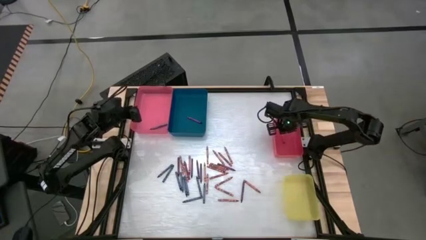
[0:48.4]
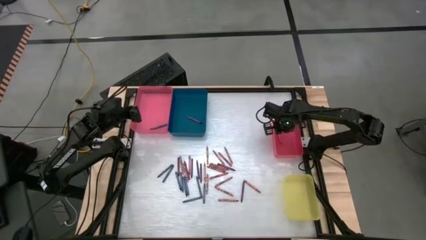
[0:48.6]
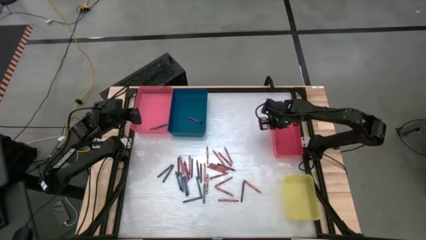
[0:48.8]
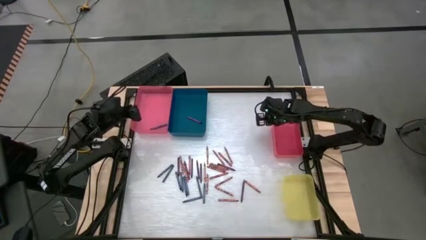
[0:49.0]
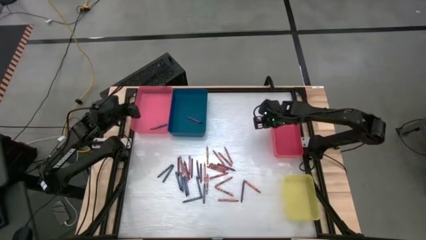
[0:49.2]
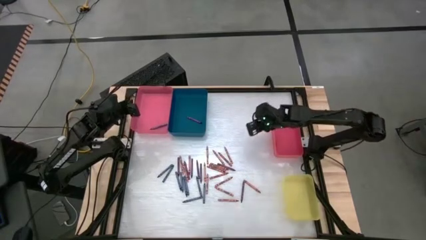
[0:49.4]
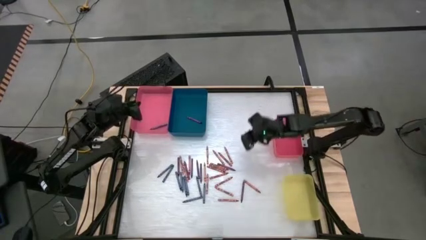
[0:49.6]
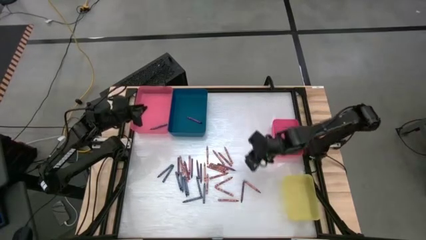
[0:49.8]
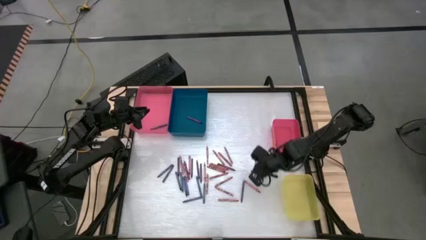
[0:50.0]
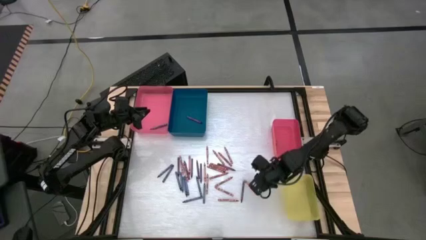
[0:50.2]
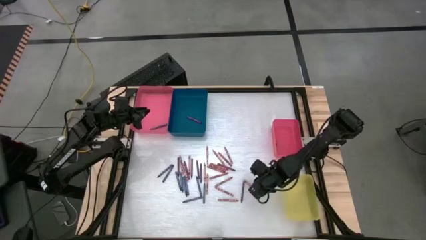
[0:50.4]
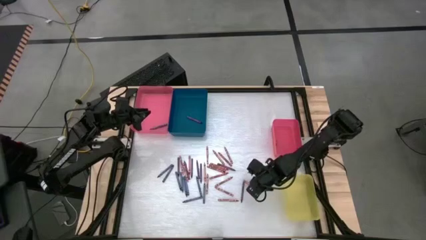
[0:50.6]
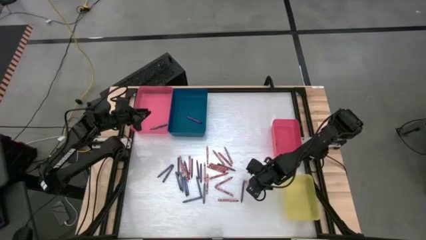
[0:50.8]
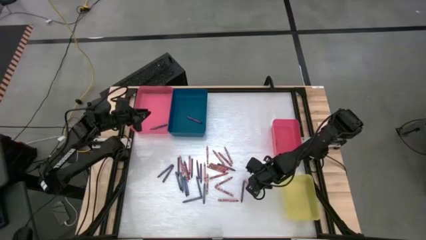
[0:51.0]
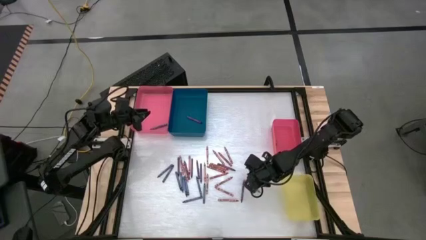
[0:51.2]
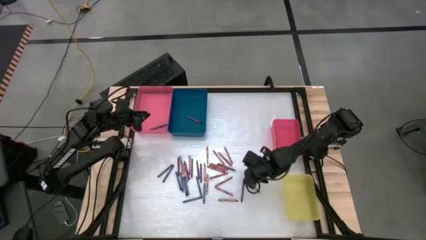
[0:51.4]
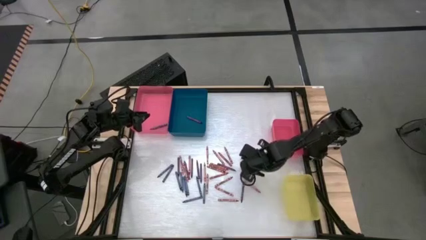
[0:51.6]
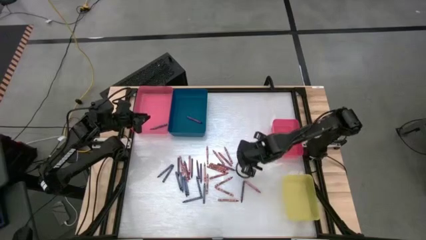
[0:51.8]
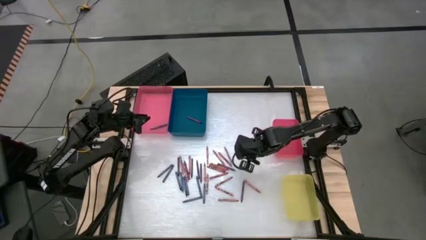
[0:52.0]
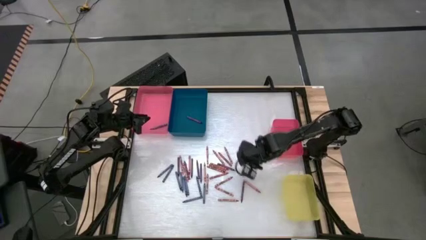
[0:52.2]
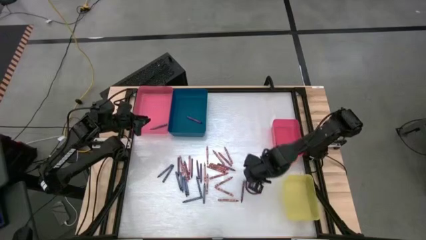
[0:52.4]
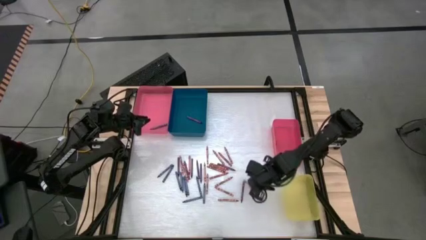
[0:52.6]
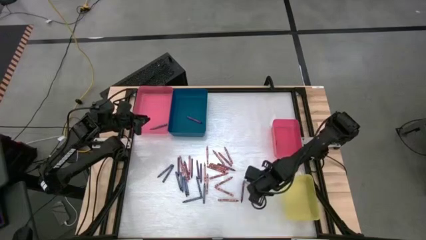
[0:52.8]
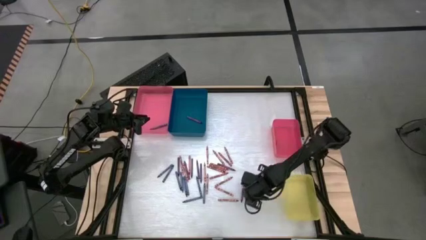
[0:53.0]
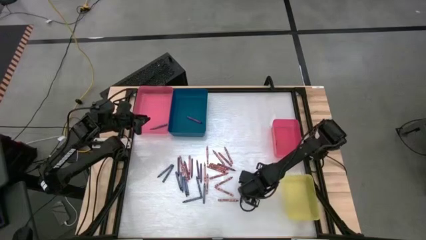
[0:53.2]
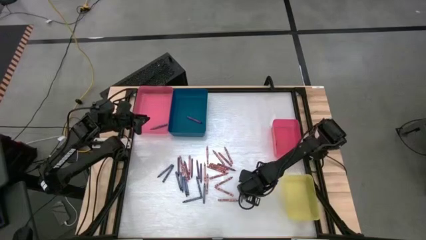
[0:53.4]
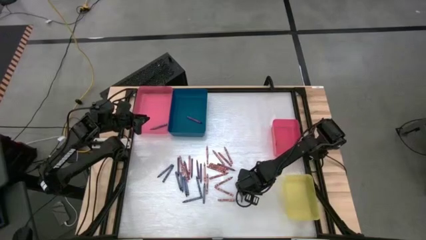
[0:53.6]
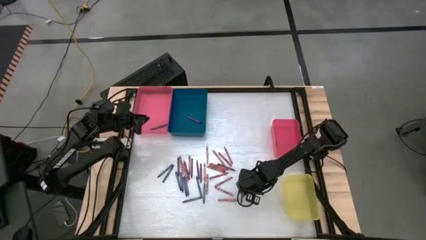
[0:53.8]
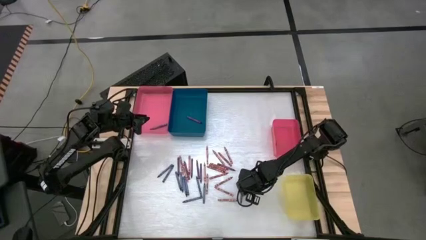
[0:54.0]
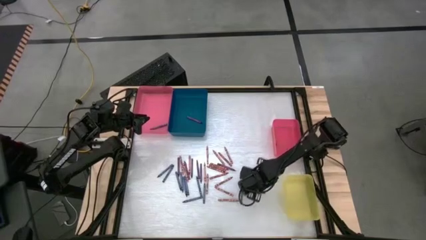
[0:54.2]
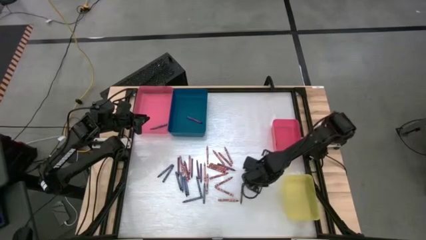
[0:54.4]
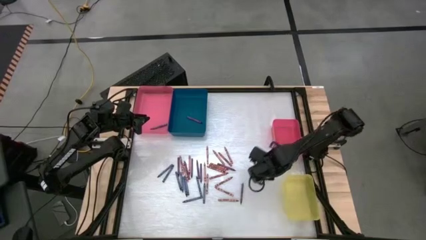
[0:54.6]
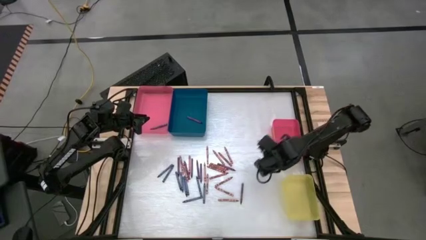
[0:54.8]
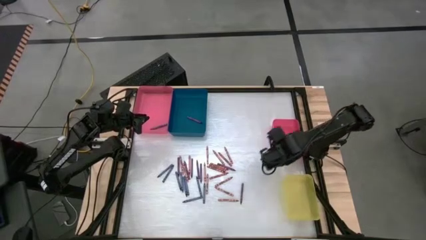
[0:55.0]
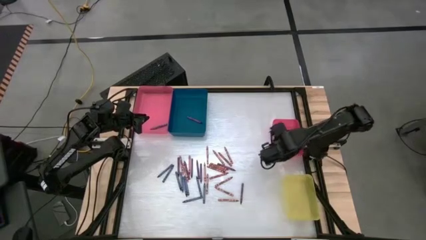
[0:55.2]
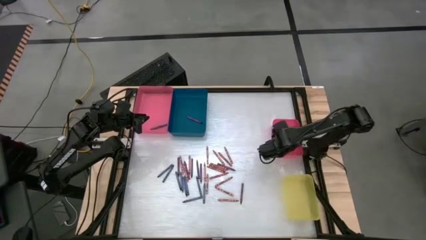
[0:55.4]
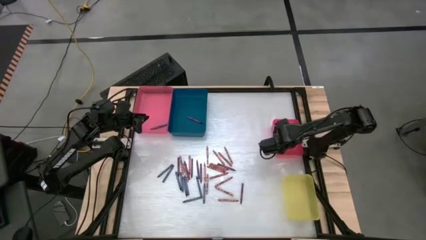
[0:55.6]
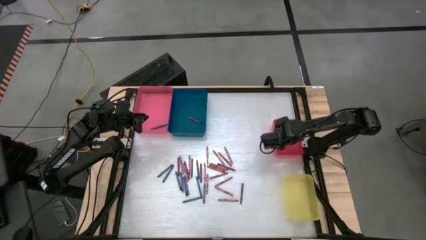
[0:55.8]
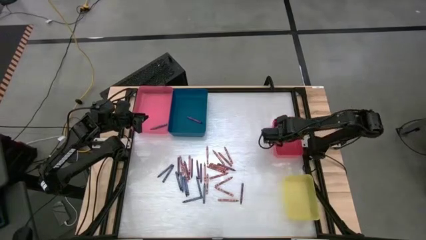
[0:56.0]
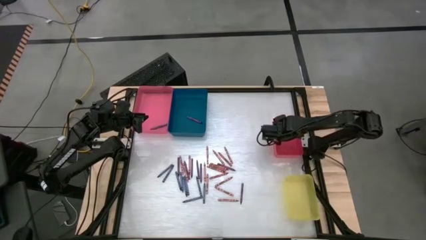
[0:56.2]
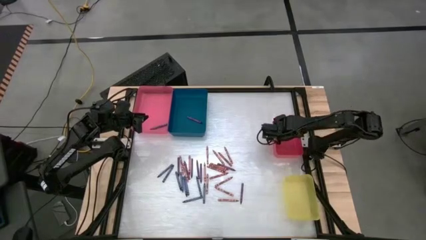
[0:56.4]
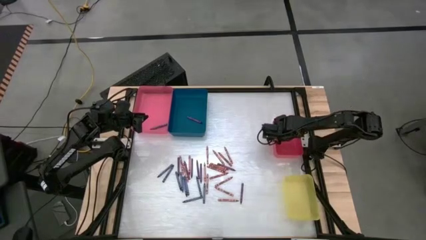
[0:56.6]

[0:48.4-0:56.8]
Task: Sort crayons
Put the red crayon into the small red bin

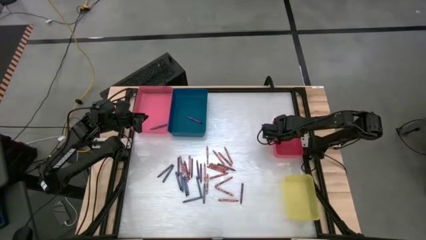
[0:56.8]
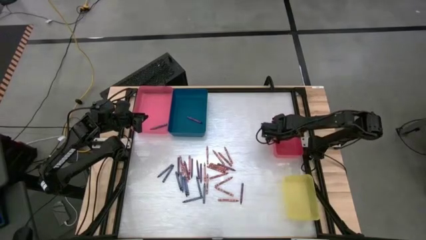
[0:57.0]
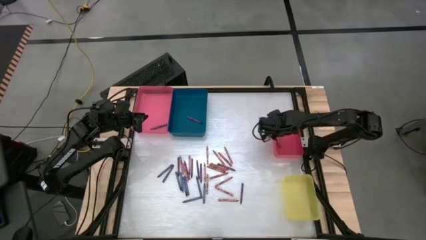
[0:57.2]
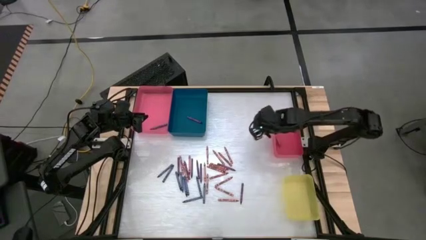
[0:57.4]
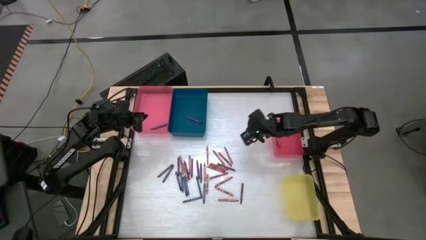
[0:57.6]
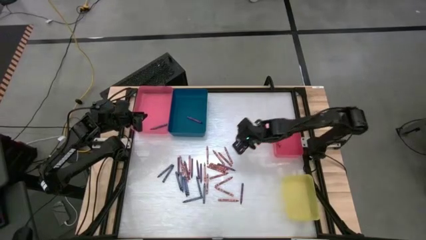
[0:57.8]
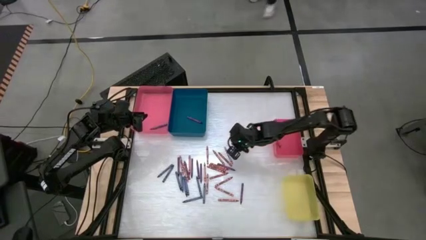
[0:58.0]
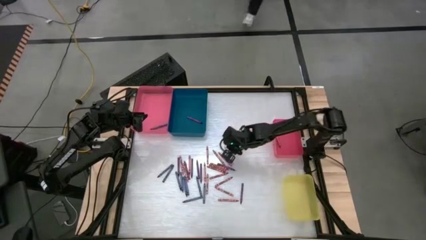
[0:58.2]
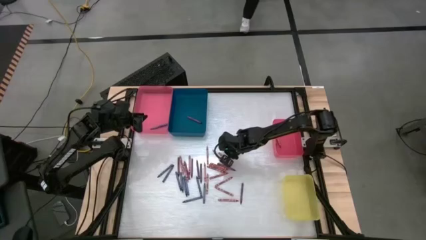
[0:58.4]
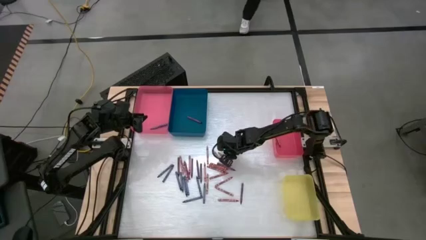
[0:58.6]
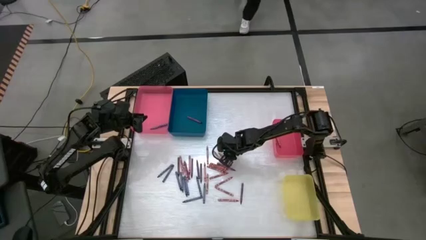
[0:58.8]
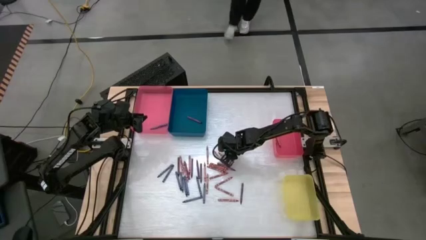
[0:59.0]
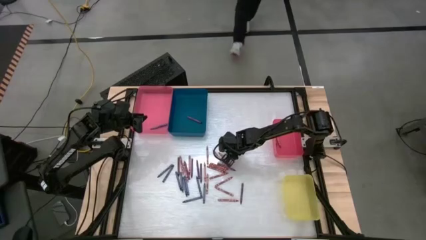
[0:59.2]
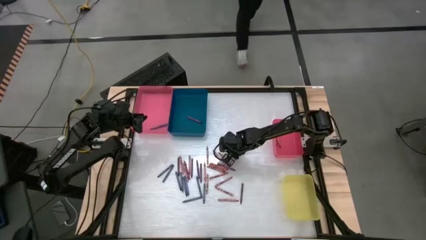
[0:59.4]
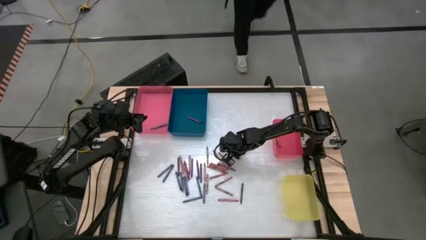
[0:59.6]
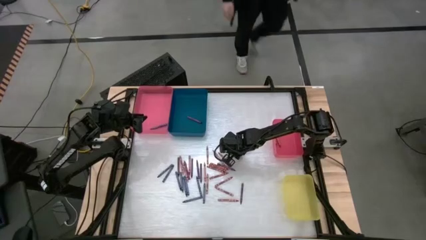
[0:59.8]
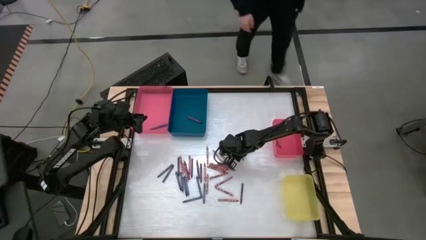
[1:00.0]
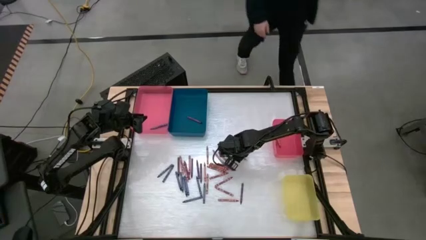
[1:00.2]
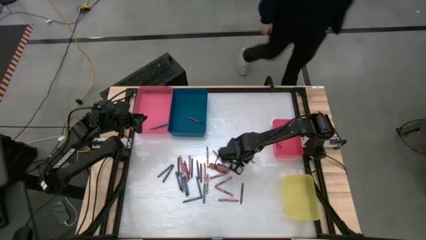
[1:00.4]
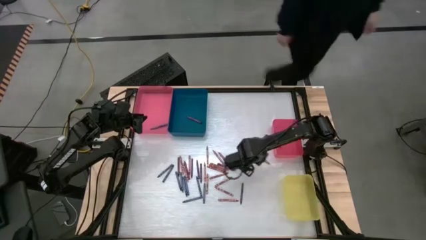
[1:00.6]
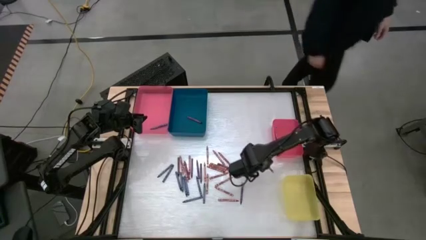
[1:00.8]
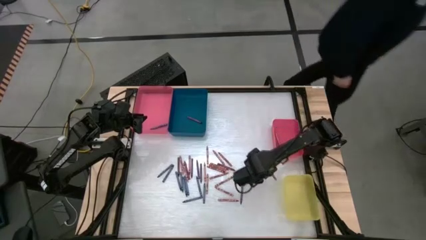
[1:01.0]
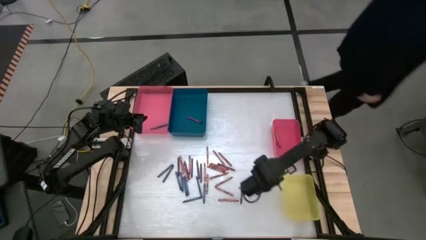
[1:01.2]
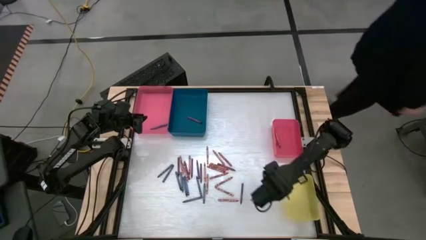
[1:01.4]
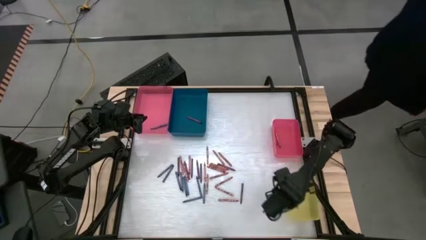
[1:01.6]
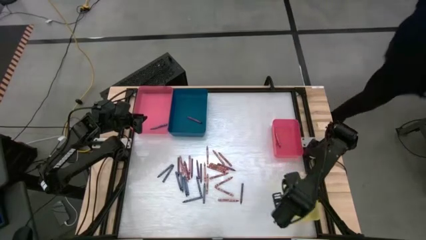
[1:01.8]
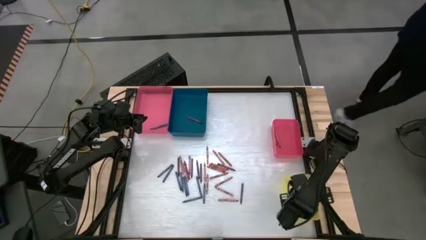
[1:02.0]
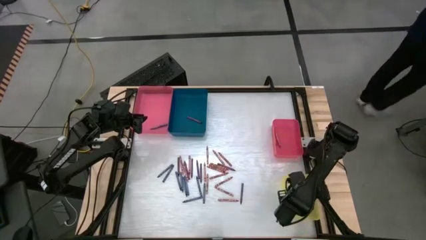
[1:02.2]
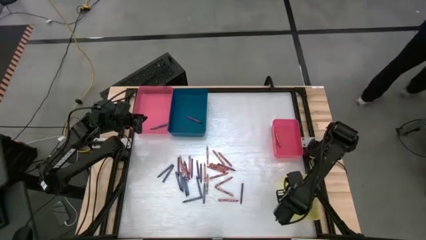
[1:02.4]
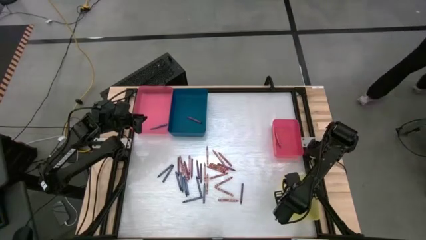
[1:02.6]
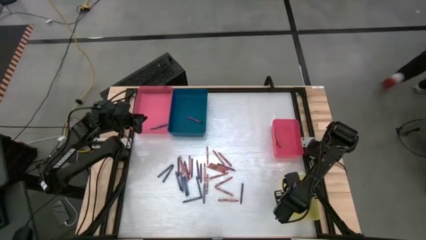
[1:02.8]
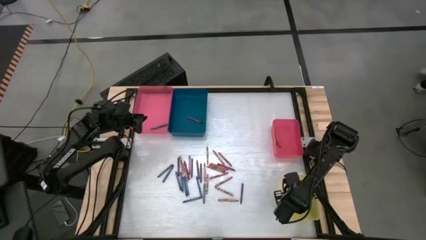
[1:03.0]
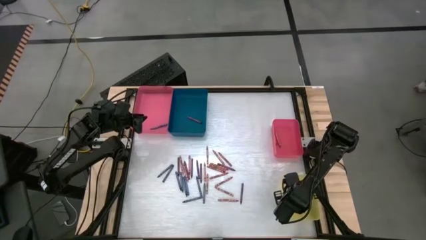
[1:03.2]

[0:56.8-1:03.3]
Put the pink crayon into the yellow bin

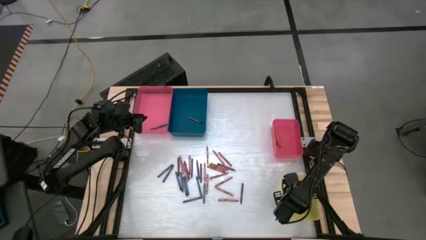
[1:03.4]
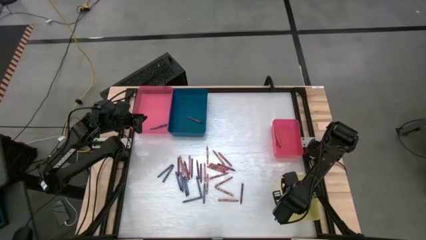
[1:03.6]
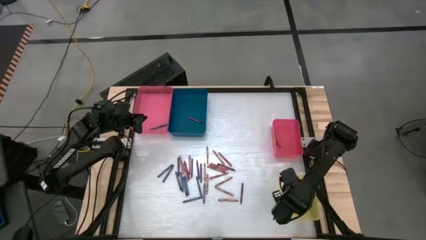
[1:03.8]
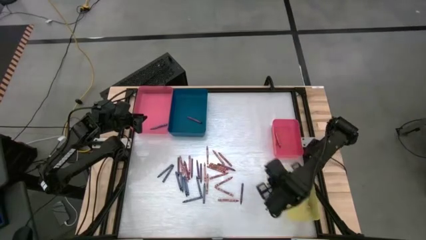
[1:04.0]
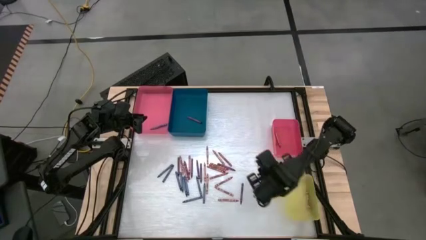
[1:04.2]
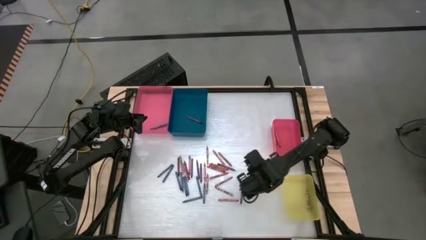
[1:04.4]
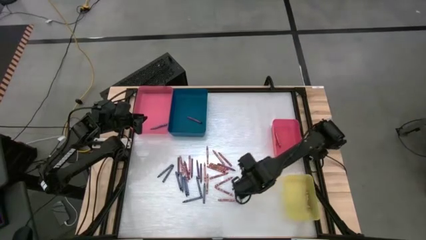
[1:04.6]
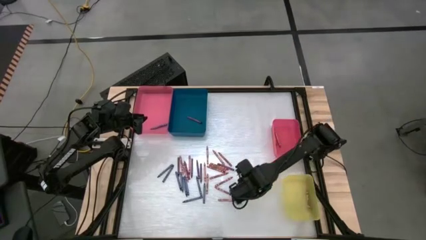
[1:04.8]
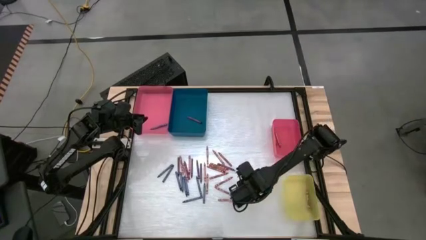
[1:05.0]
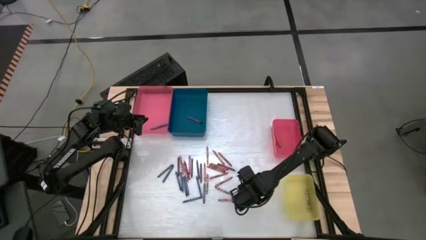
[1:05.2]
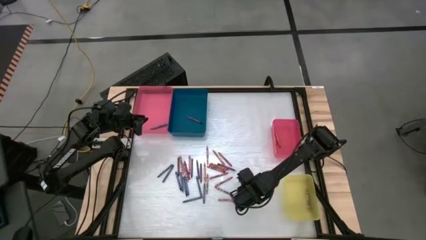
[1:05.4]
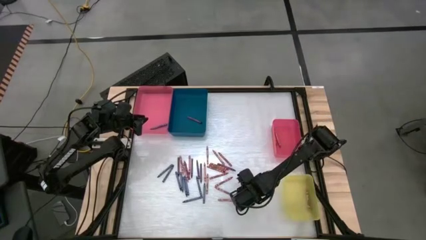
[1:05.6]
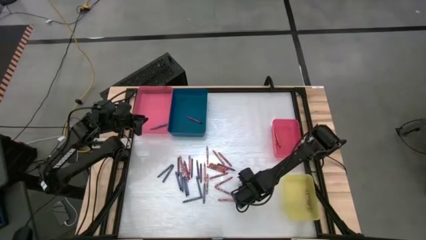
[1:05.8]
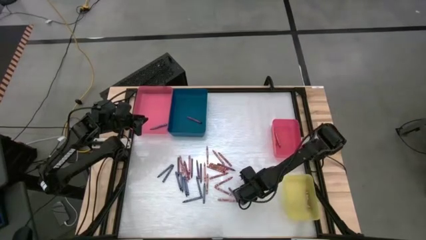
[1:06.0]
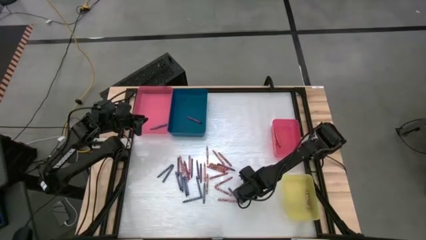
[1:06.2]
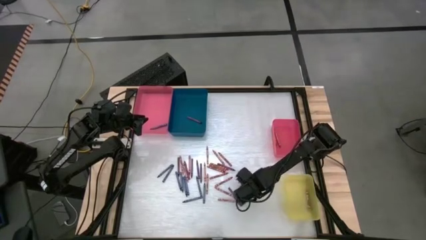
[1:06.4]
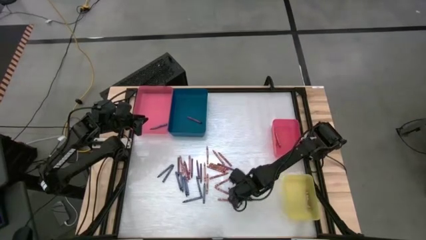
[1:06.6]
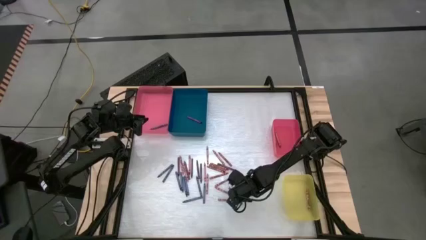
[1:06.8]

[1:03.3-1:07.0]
Put the purple crayon into the blue bin
